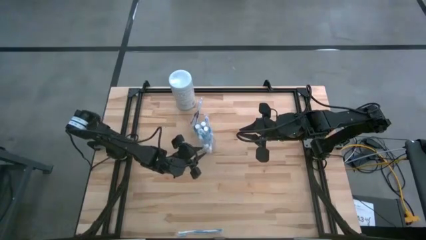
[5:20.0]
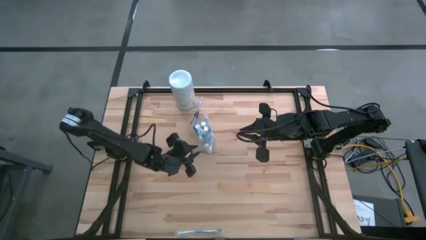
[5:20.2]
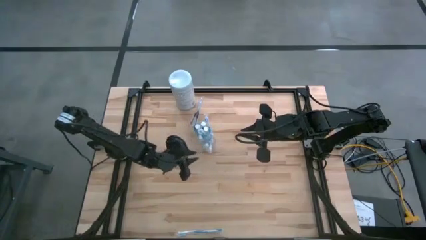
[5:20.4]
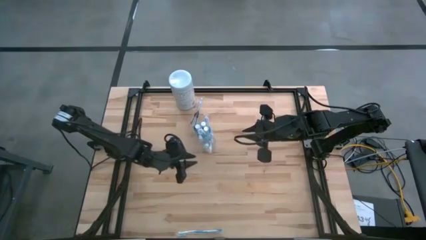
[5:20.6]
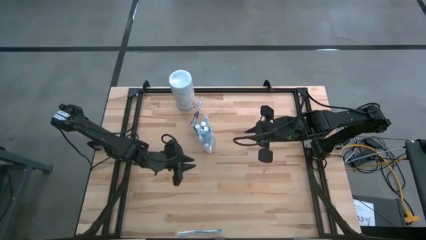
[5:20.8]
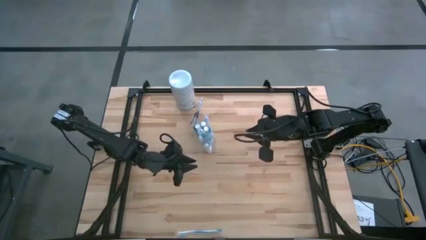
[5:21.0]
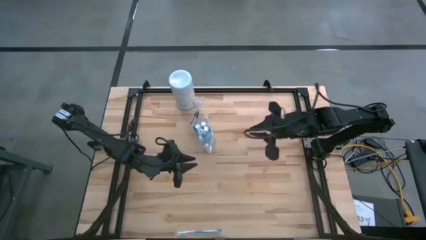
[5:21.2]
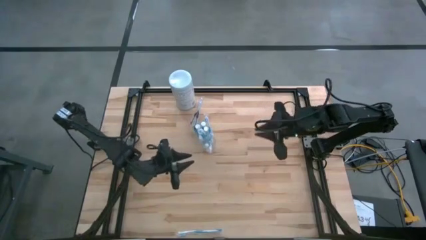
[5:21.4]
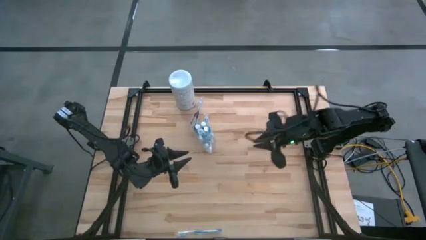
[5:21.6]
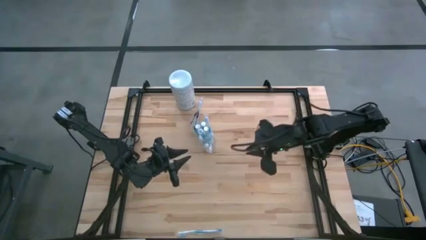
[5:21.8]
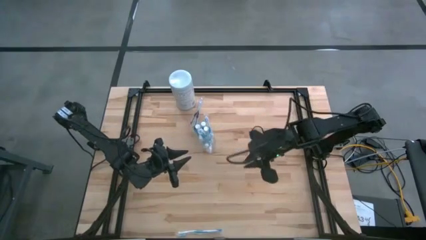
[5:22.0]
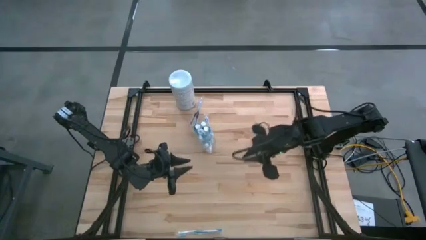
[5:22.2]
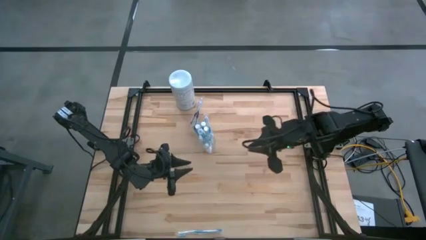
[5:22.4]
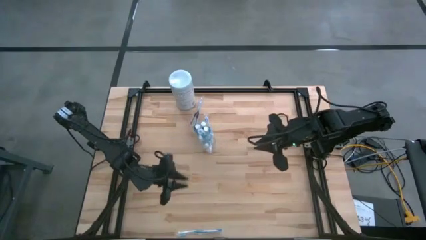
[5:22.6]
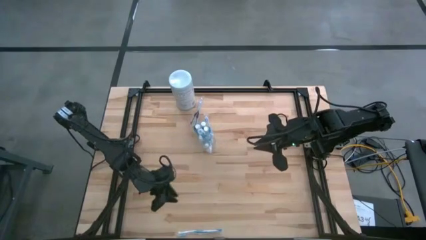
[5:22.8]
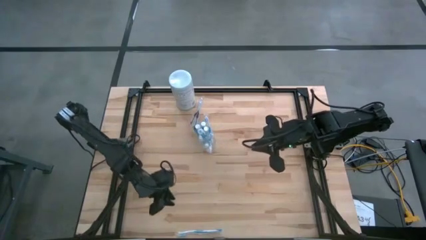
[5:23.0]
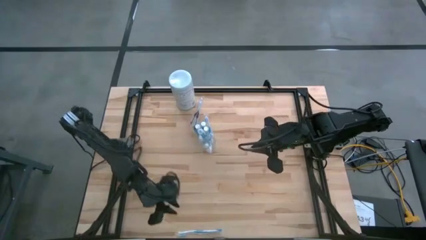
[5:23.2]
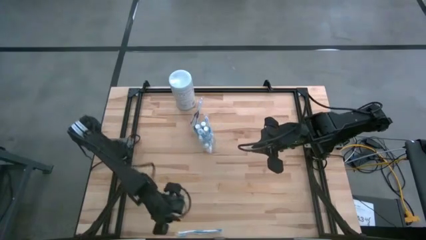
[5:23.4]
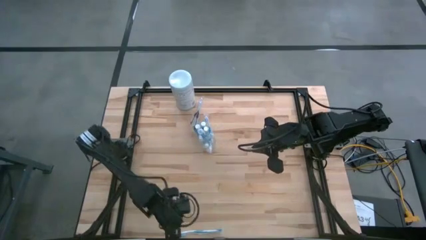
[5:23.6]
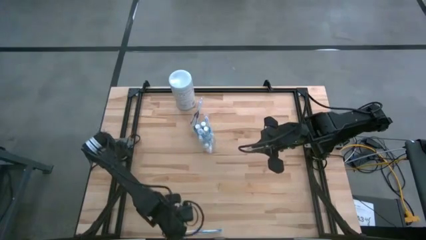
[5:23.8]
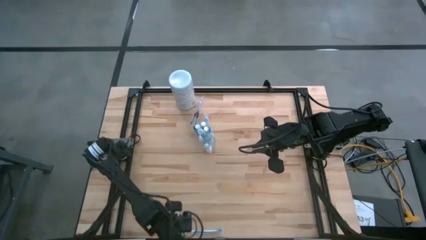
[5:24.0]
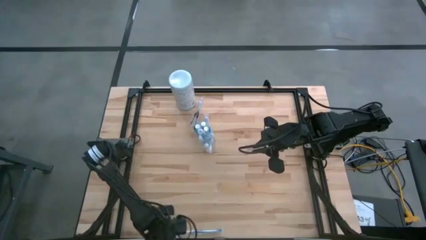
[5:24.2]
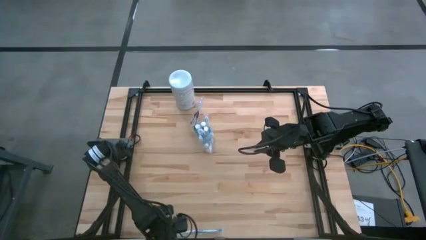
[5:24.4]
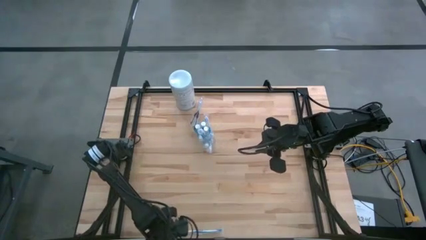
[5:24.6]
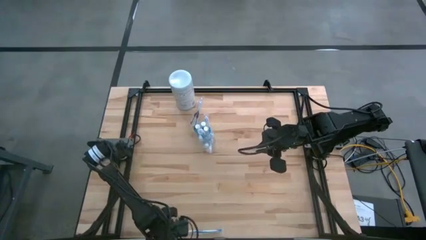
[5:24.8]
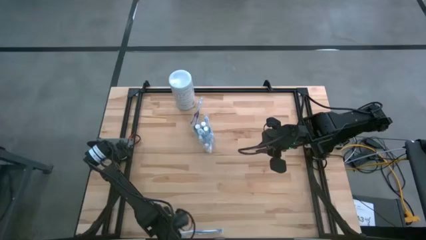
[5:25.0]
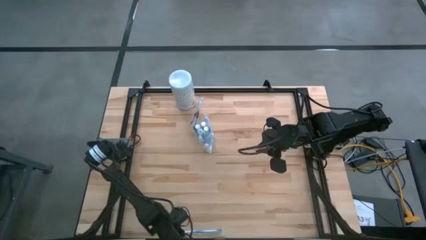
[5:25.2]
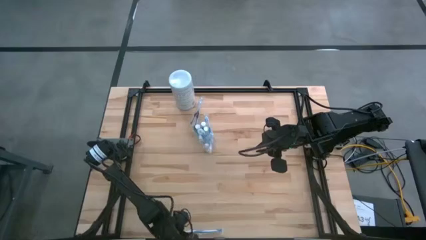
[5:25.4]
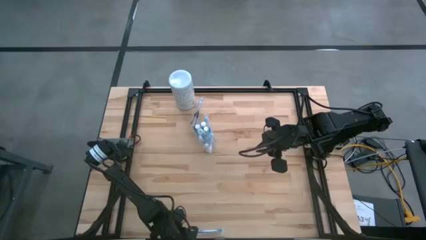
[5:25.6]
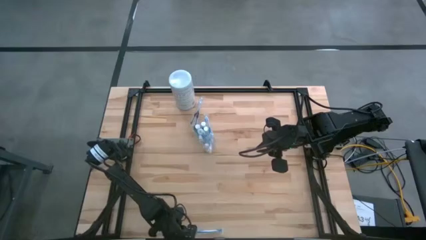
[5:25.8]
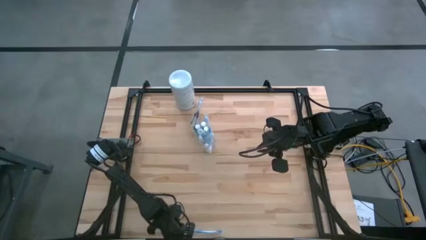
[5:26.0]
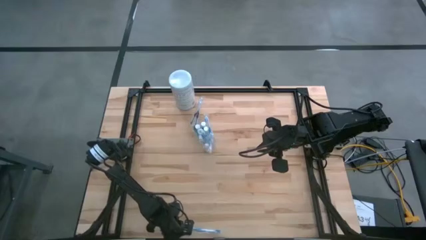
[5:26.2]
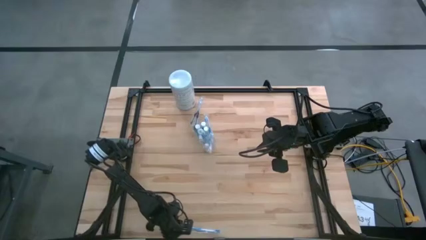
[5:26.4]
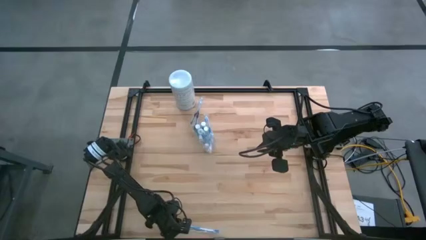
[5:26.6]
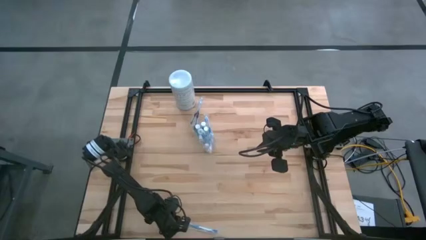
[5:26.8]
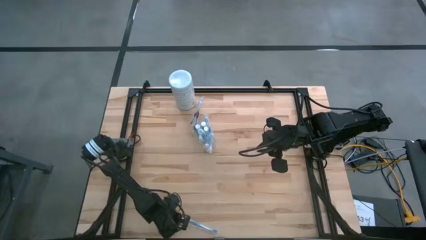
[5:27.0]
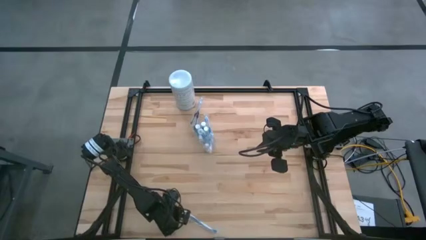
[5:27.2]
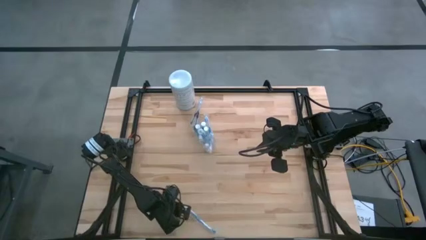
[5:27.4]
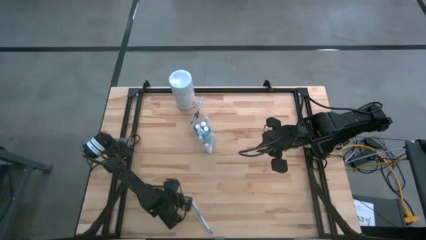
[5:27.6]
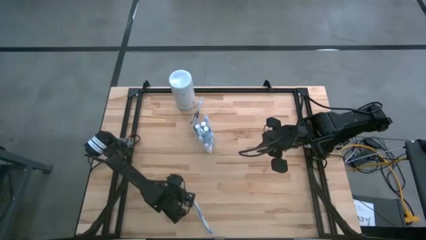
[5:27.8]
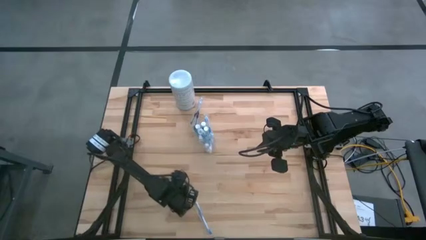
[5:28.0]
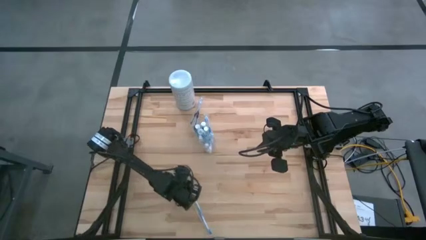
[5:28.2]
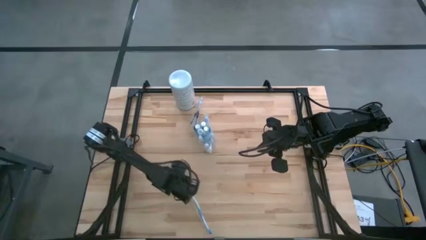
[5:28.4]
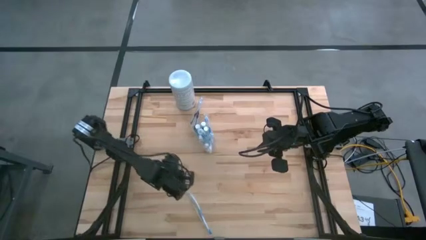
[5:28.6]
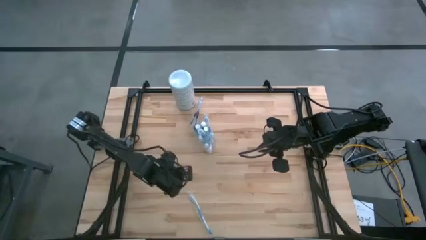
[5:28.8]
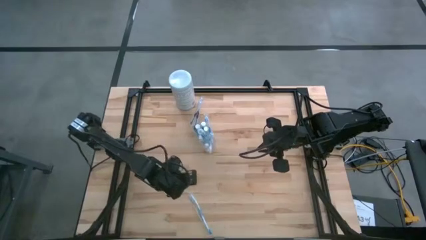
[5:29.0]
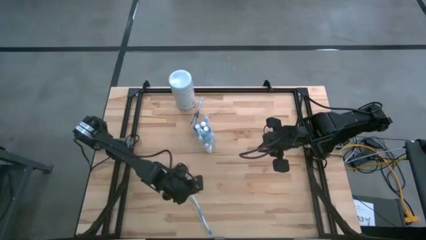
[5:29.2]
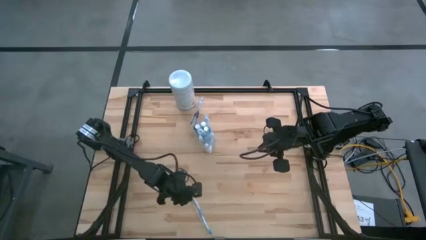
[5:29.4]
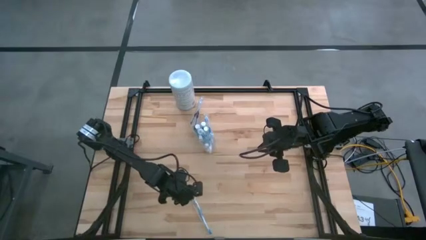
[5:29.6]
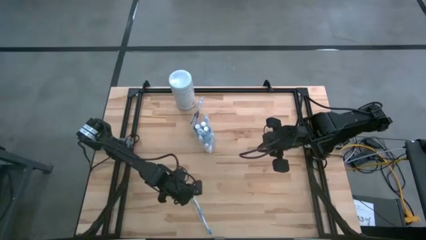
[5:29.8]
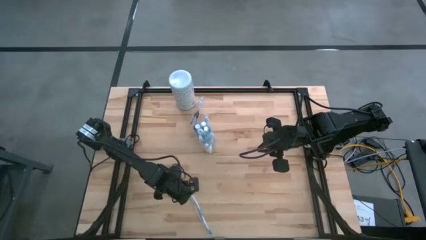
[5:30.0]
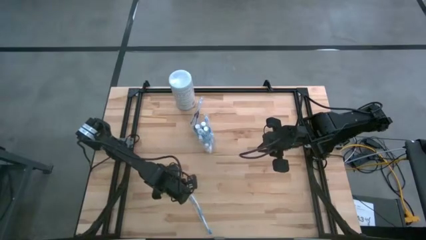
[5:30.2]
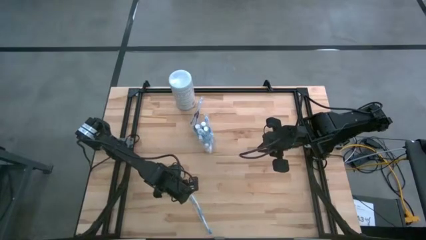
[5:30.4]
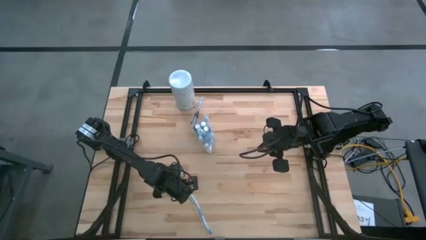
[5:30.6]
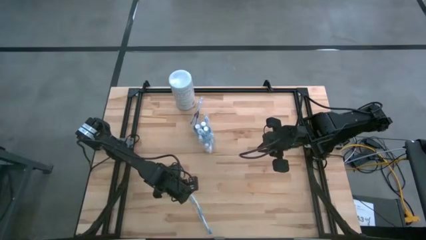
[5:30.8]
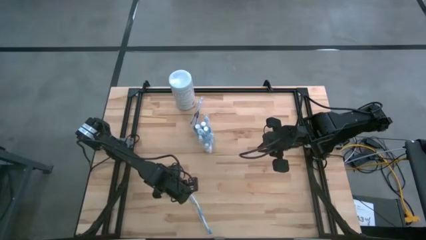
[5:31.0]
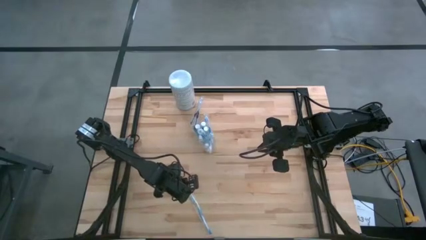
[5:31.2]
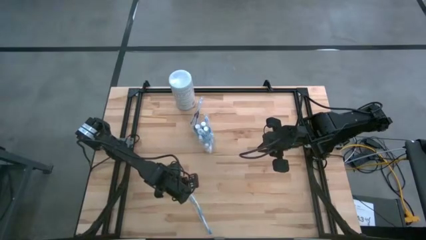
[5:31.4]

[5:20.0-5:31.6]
Task: Pick & Place toothbrushing station
Put the blue toothbrush into the right of the transparent organizer

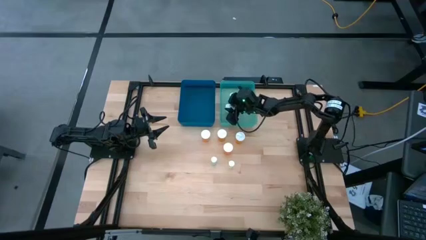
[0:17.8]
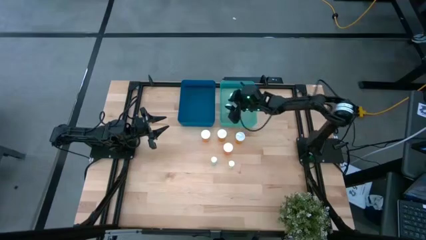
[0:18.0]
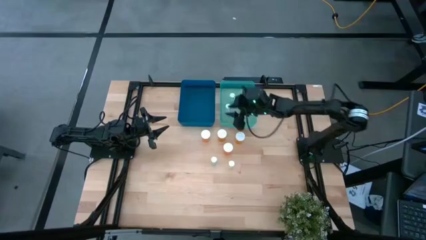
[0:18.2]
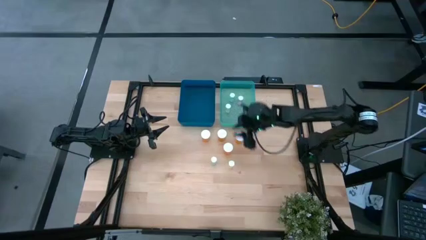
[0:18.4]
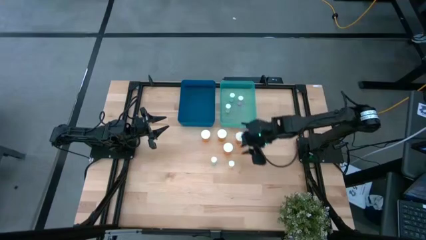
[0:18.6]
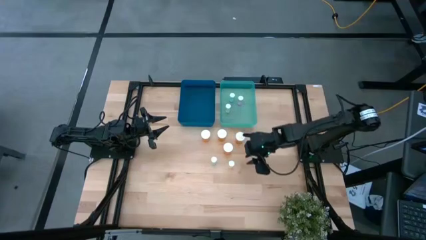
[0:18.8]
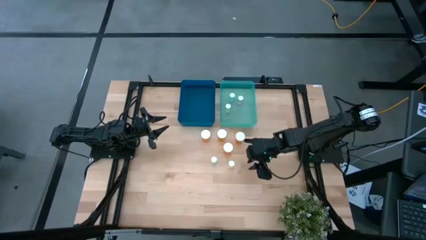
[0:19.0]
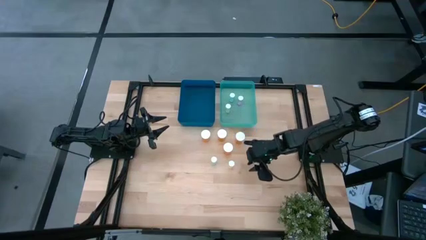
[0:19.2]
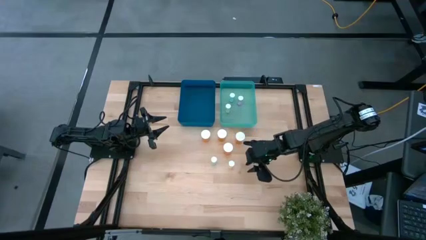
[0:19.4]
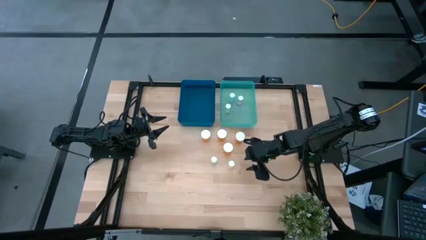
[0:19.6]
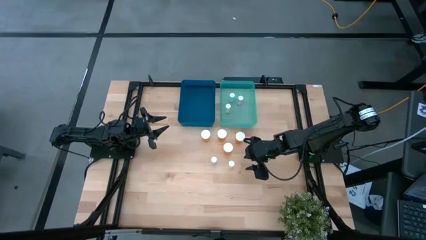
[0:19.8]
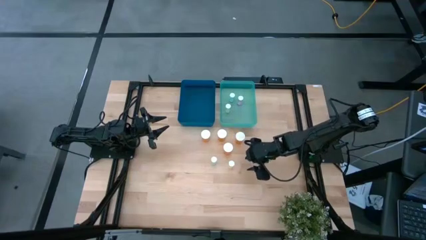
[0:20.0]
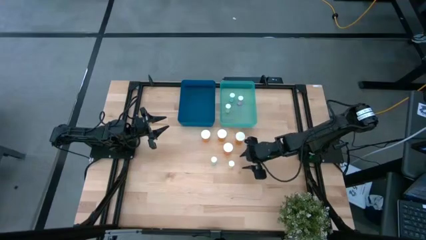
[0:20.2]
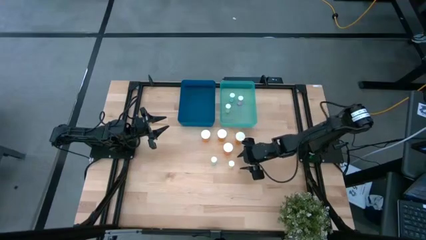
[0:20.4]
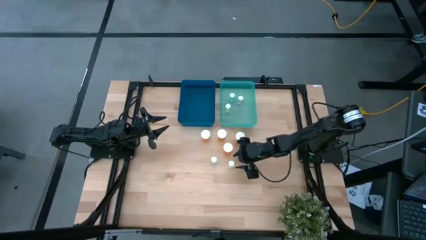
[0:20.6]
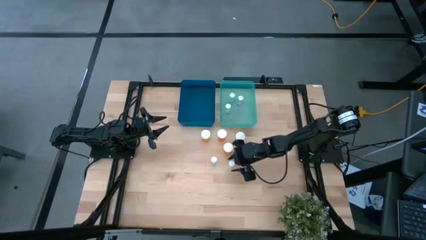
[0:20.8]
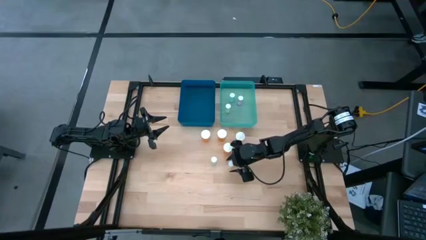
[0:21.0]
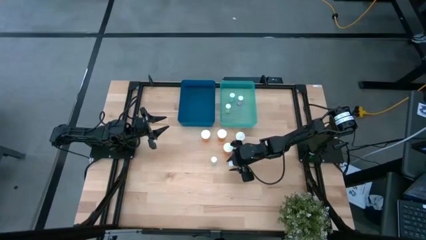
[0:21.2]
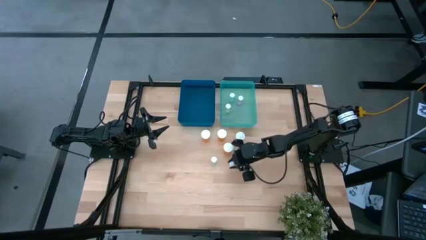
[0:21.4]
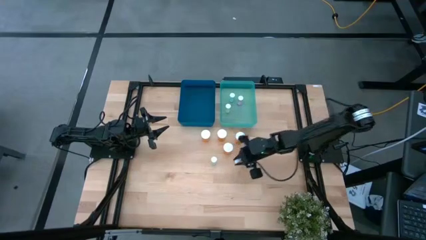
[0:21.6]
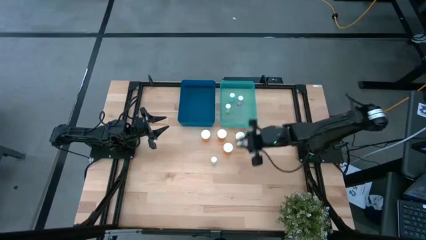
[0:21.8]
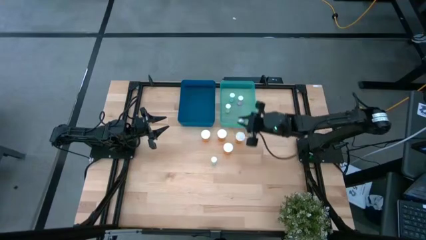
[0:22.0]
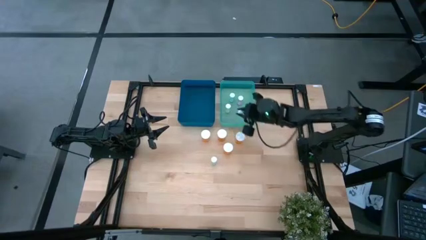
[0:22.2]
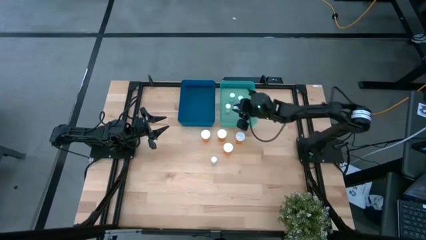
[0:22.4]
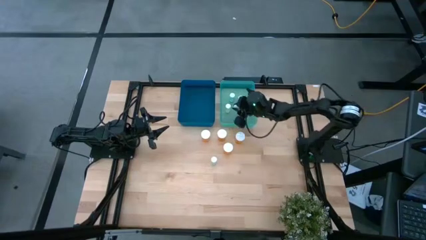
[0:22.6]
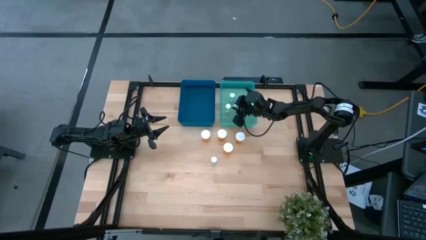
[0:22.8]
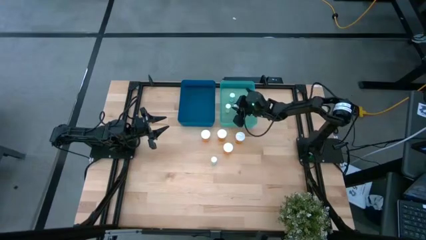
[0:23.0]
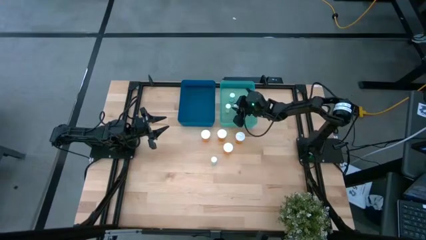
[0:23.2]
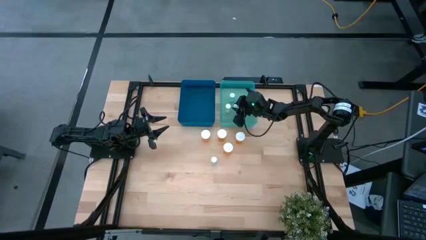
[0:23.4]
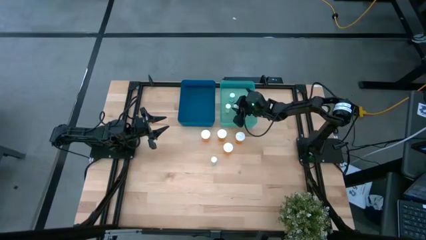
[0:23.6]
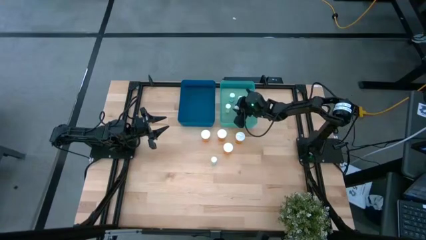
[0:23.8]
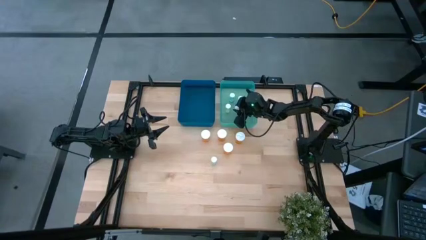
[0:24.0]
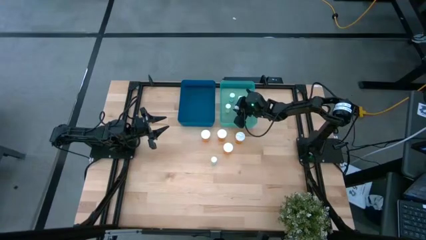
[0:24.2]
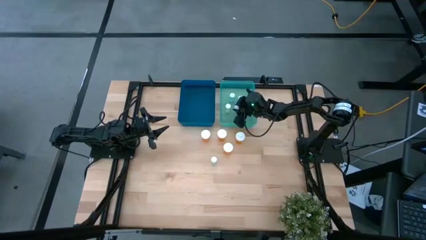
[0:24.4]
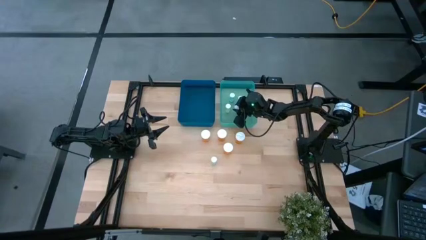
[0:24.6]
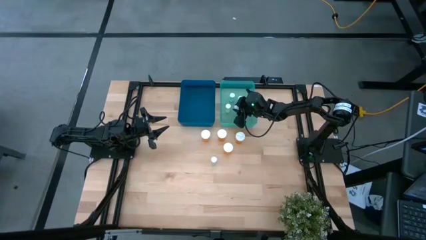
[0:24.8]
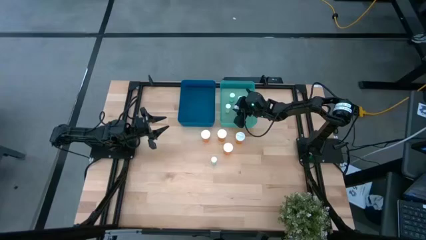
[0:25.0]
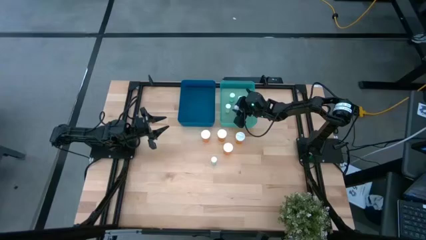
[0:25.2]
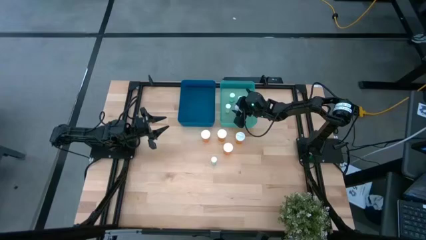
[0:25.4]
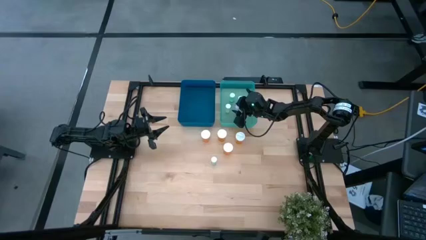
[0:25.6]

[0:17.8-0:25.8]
Task: Pick and place medicine bottles into bin by pill shape (circle, oval)
Put the yellow tablet bottle into the light blue bin
